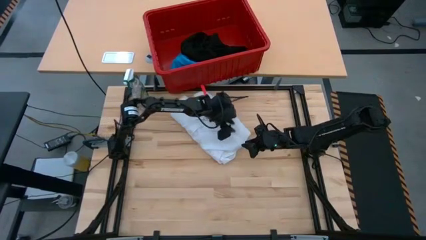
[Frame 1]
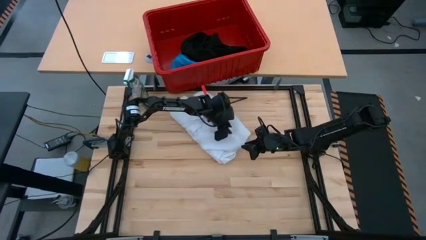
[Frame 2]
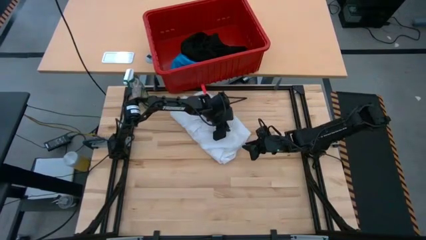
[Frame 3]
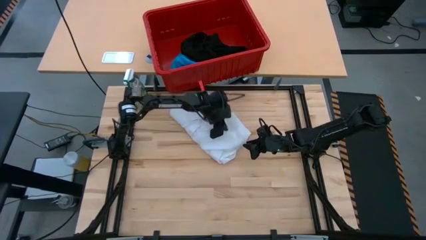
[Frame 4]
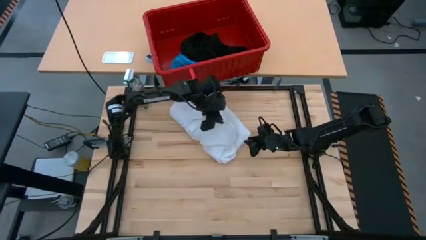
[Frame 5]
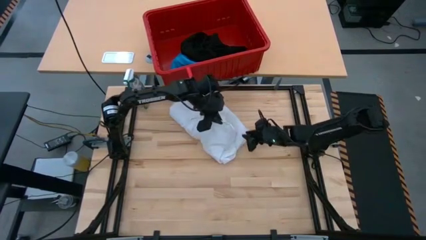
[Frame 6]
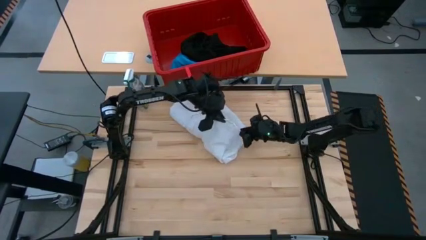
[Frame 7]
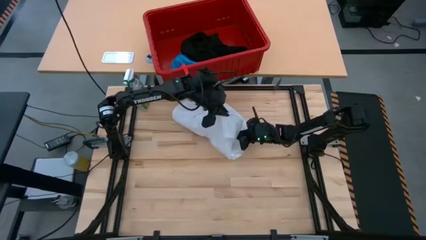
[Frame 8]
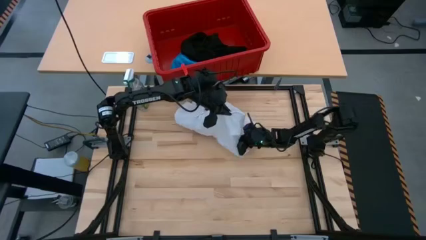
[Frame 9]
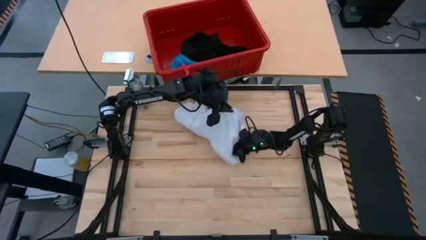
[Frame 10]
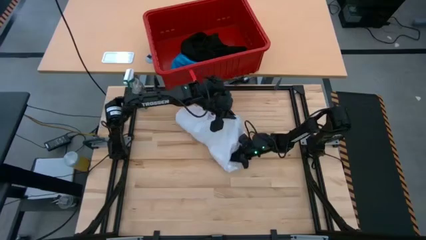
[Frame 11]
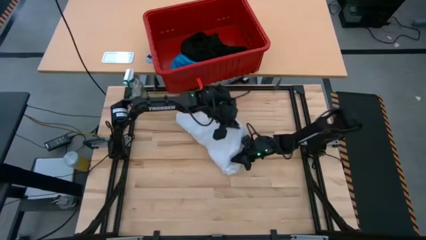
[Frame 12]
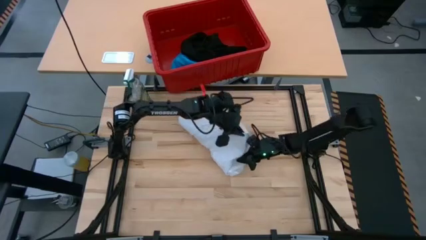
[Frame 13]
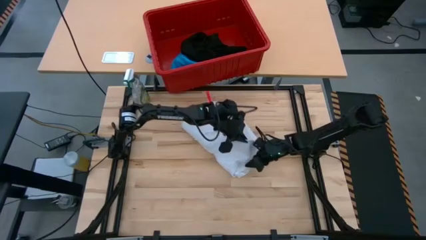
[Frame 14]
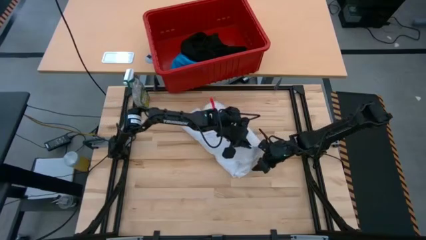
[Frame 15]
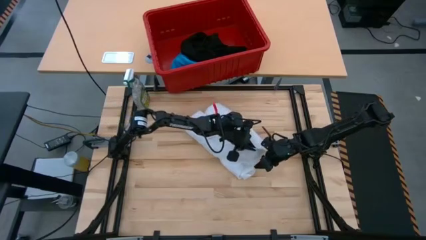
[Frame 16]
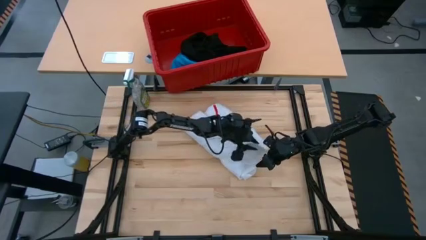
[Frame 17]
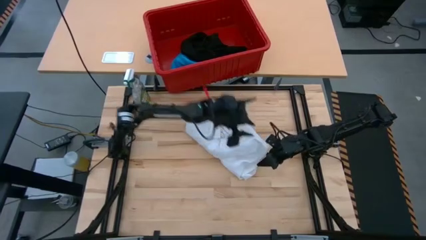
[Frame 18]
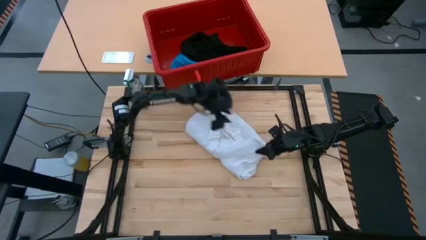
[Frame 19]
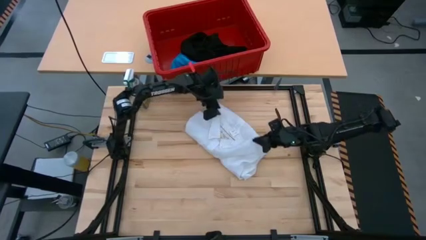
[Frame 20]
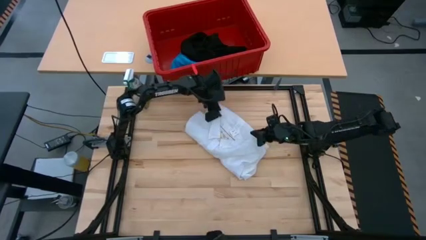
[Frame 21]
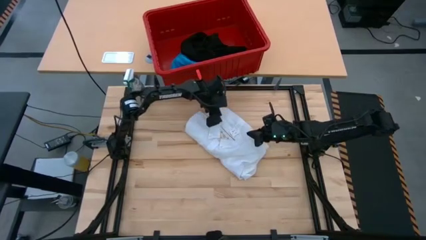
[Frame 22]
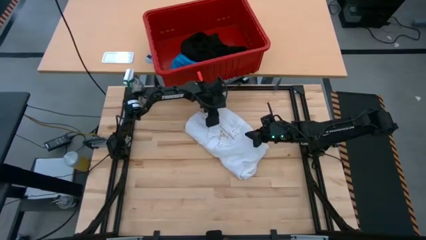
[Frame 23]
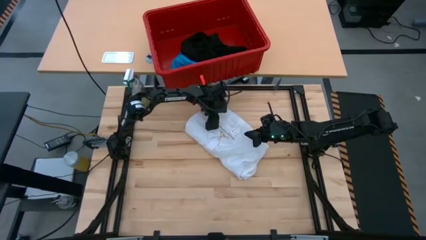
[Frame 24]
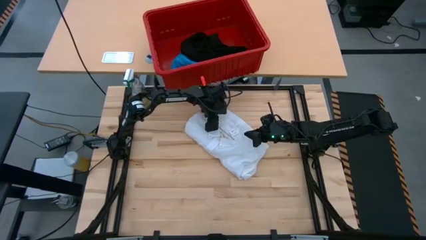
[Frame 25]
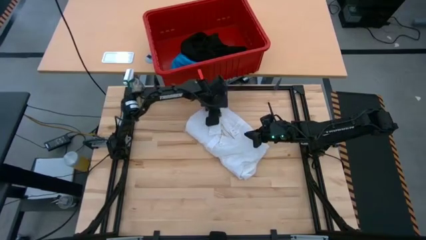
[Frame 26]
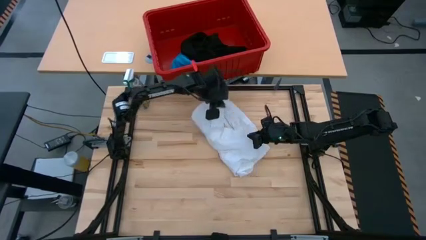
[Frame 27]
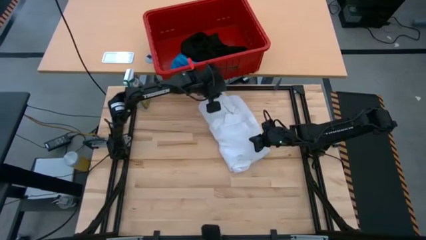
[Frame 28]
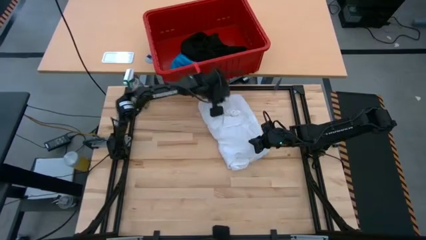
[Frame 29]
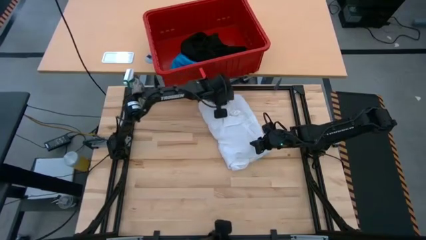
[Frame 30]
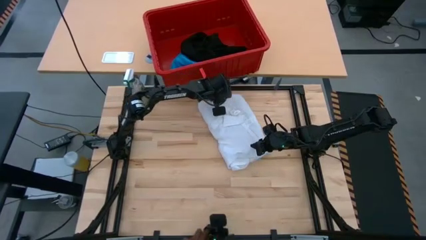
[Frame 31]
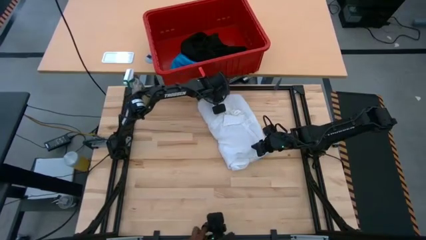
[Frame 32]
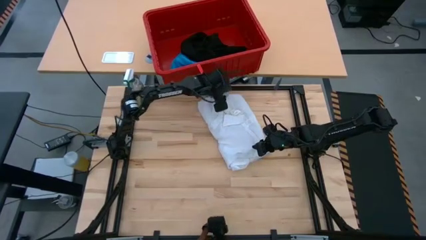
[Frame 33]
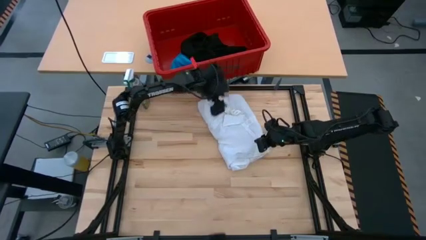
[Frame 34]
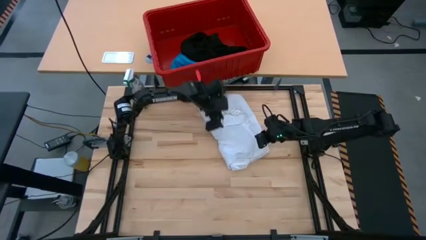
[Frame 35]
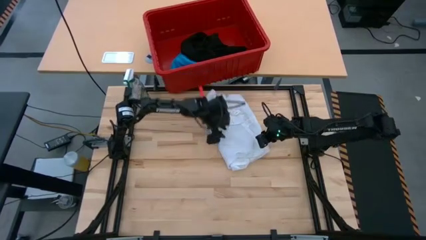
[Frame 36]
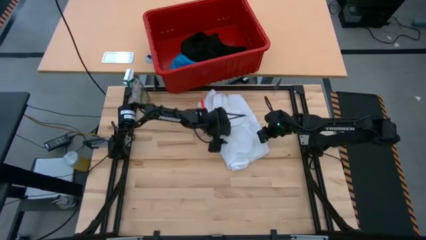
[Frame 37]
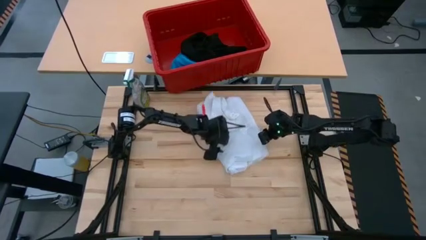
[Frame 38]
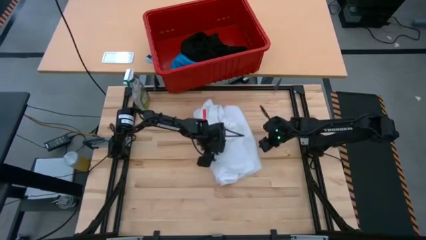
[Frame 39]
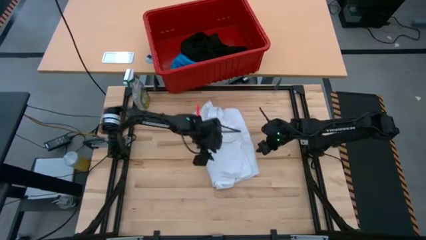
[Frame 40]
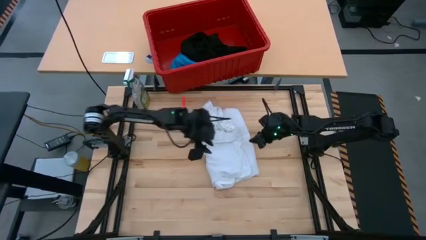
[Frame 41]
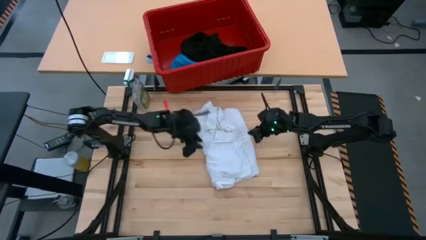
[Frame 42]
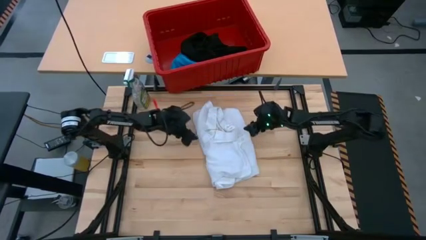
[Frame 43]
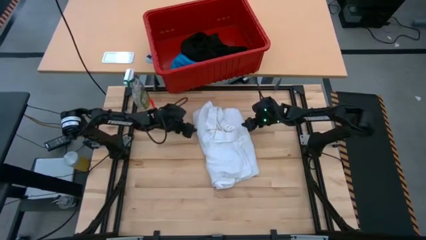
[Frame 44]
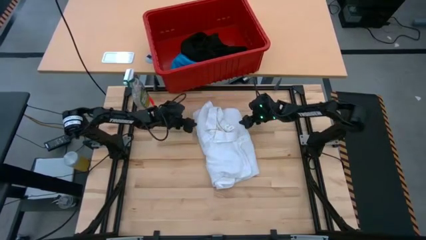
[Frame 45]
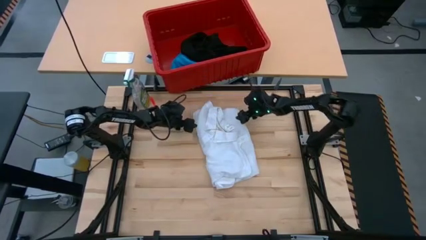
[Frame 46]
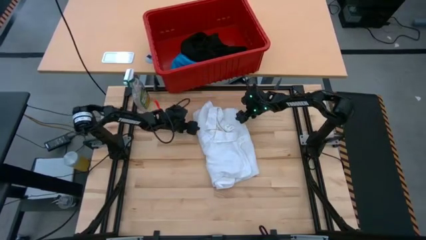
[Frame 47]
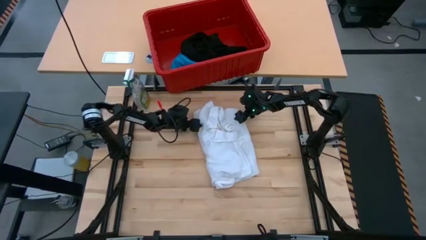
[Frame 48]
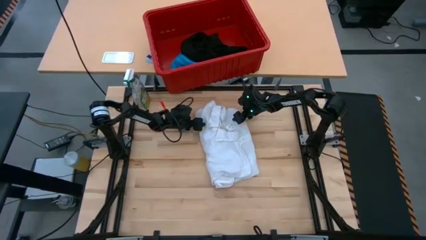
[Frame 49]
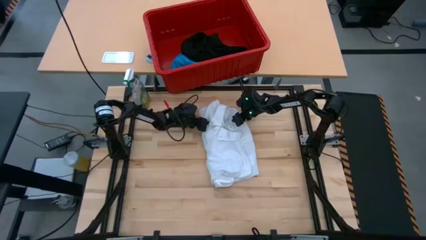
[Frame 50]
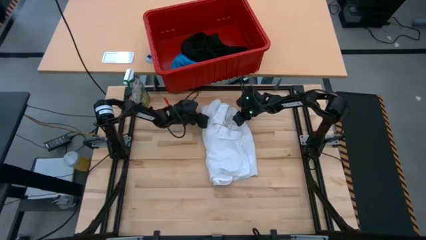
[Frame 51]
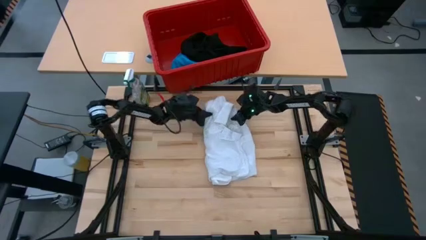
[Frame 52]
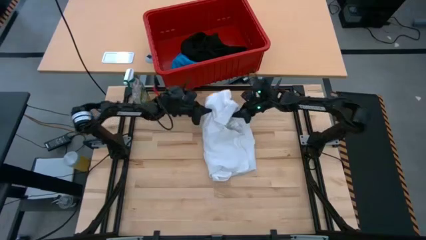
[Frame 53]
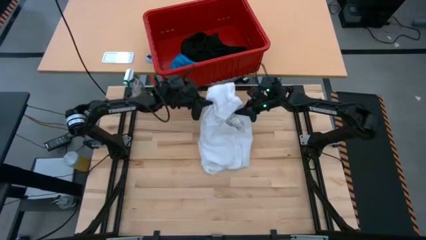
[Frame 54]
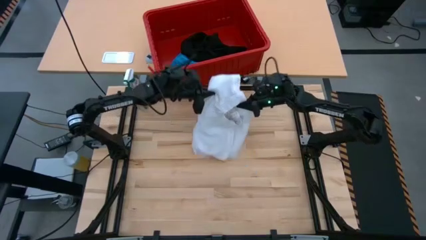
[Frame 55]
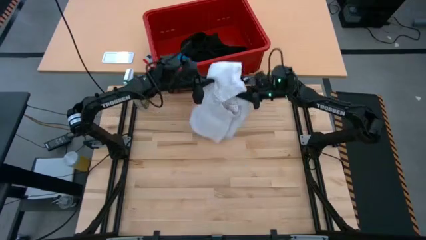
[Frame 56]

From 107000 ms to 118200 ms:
Task: Fold laundry
Fold the white polo shirt

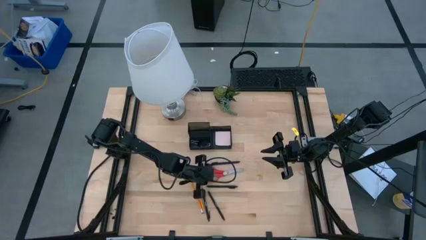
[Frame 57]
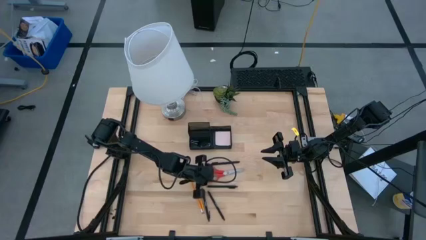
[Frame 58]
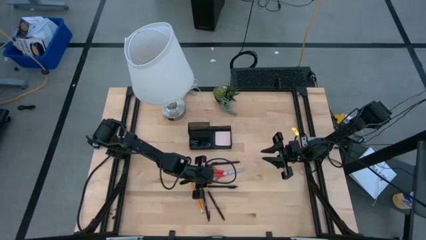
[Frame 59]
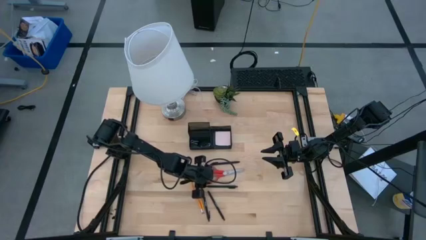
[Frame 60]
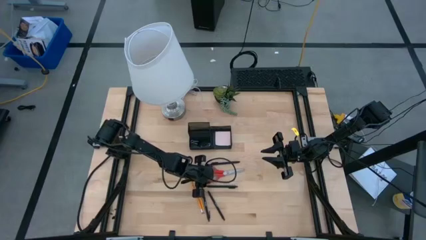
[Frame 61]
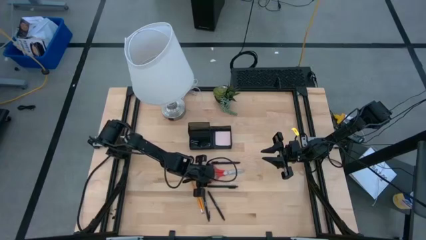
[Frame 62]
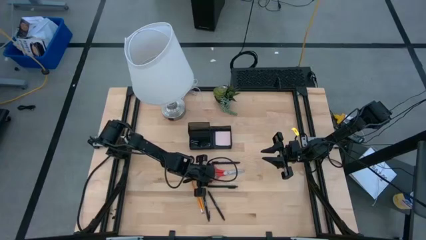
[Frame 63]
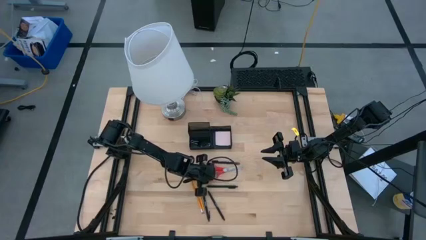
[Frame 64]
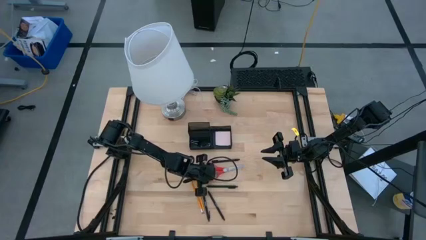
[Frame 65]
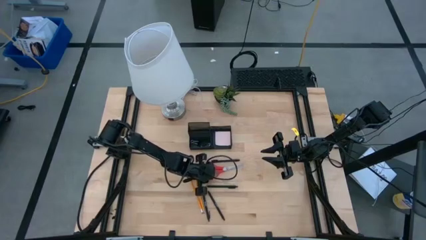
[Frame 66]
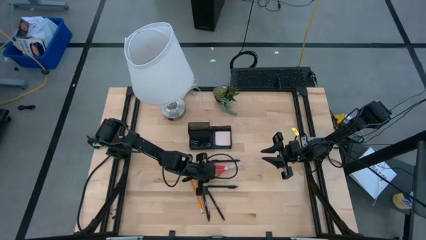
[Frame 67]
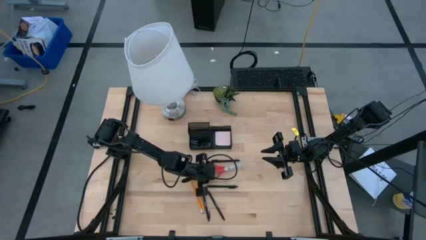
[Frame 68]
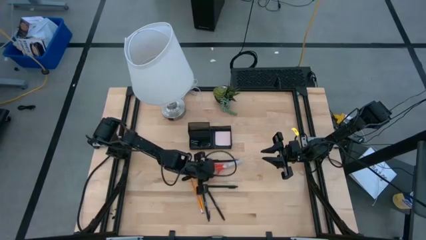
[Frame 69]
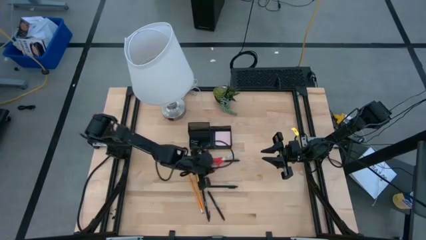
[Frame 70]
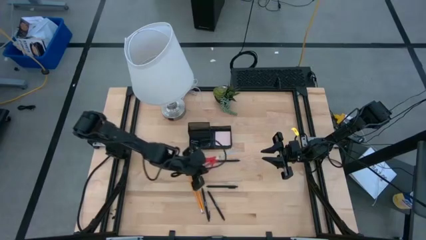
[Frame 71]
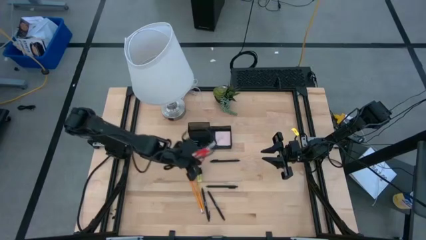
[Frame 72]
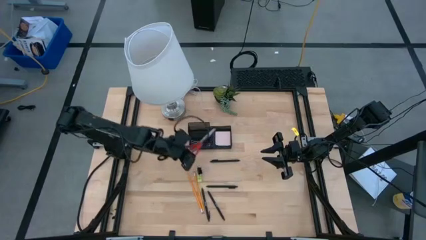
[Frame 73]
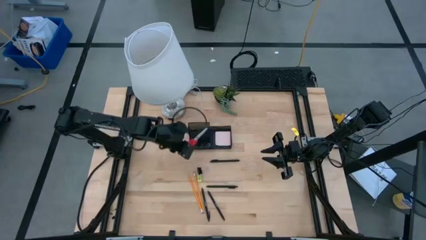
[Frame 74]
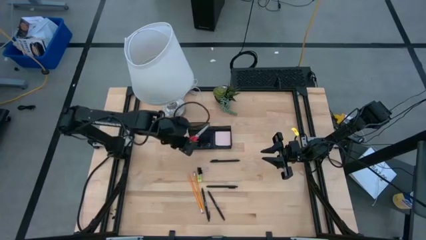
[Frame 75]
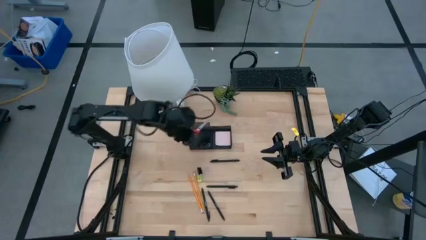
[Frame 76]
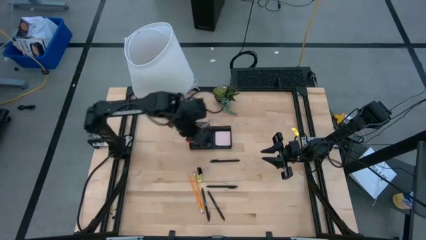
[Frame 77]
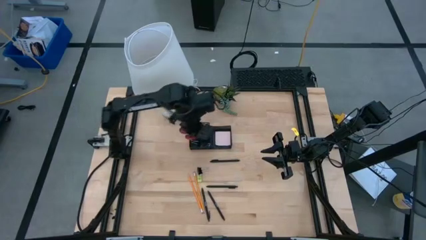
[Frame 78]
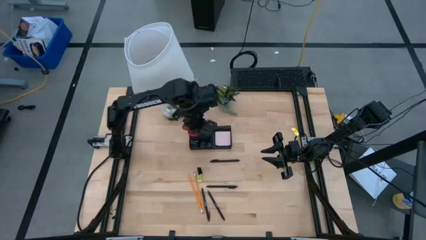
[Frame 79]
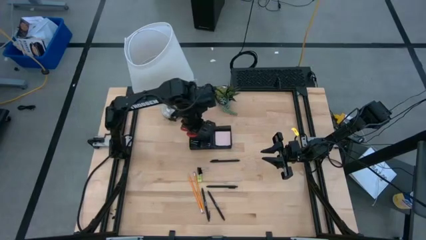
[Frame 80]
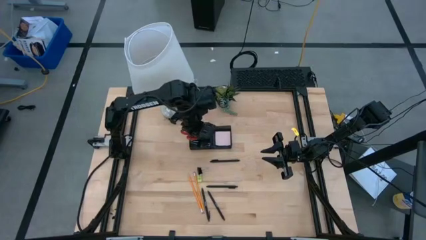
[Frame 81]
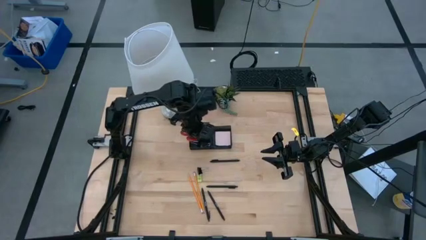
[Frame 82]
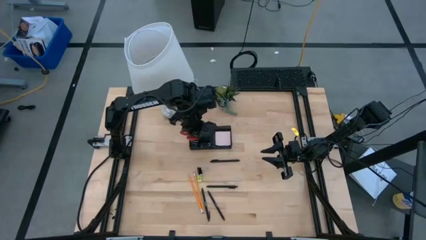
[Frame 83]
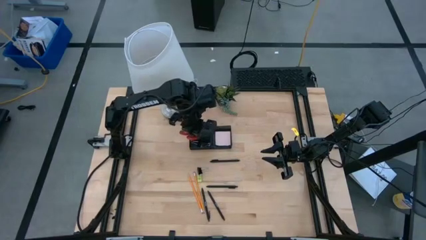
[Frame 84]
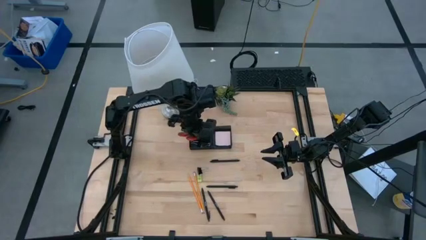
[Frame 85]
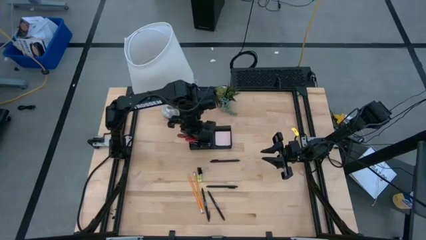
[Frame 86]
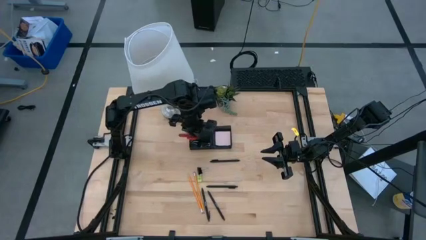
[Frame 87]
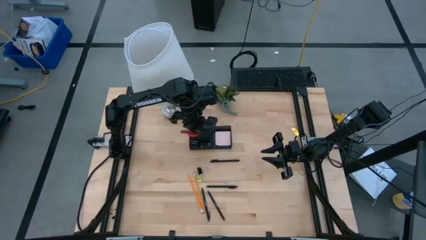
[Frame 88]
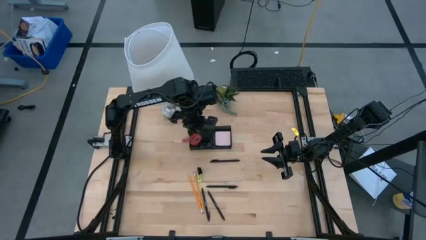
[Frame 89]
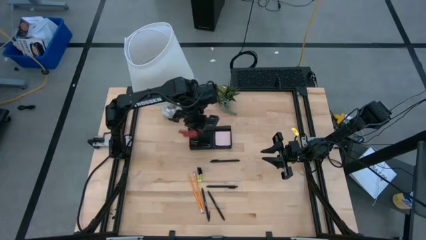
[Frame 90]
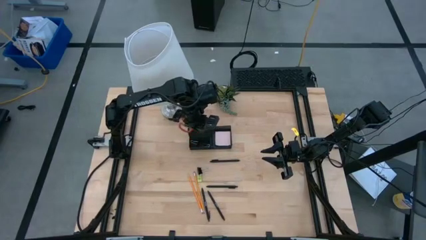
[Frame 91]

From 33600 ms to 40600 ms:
Task: Pick and place office supplies into organizer
Put the scissors into the black desk organizer
